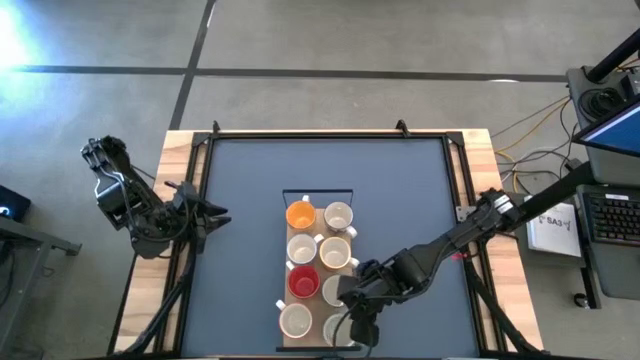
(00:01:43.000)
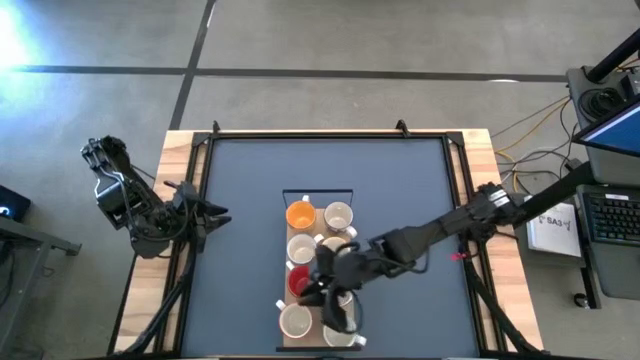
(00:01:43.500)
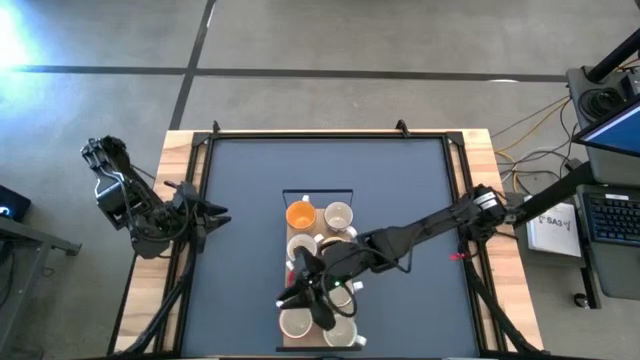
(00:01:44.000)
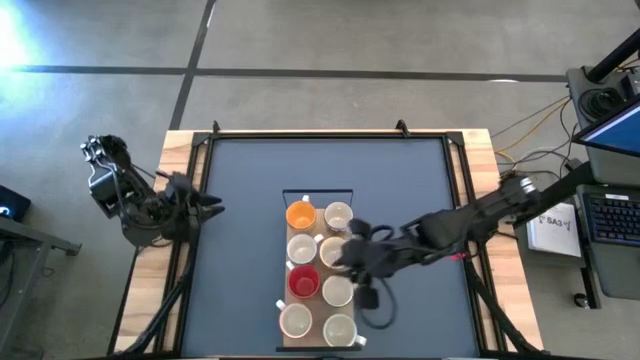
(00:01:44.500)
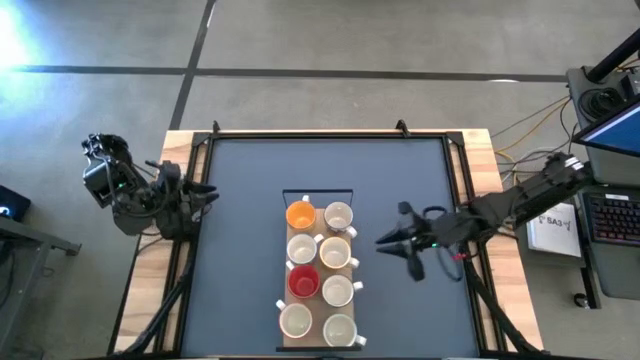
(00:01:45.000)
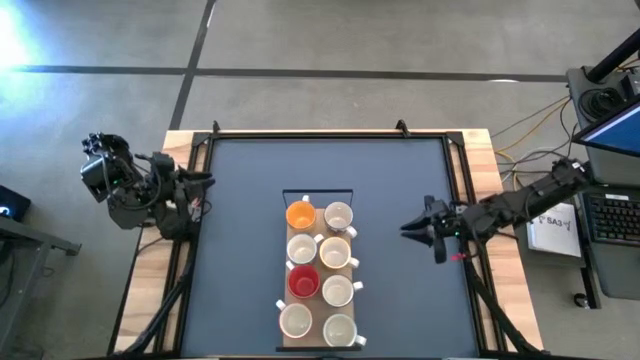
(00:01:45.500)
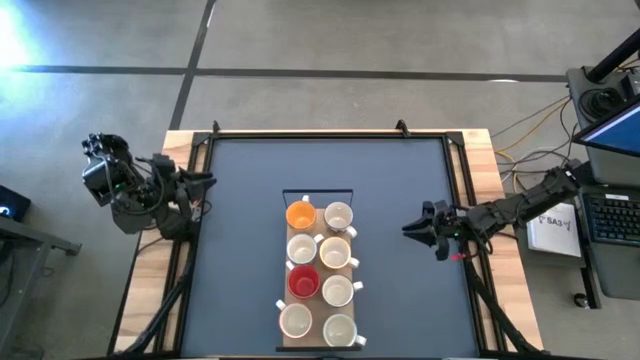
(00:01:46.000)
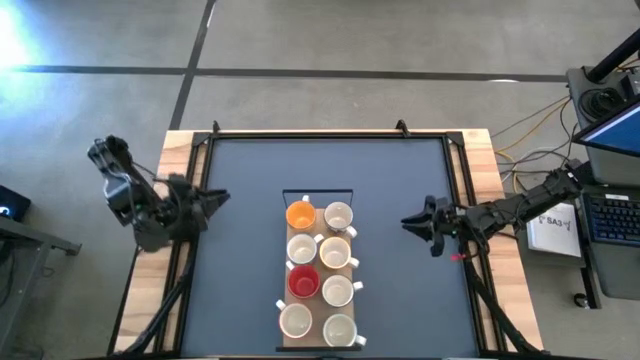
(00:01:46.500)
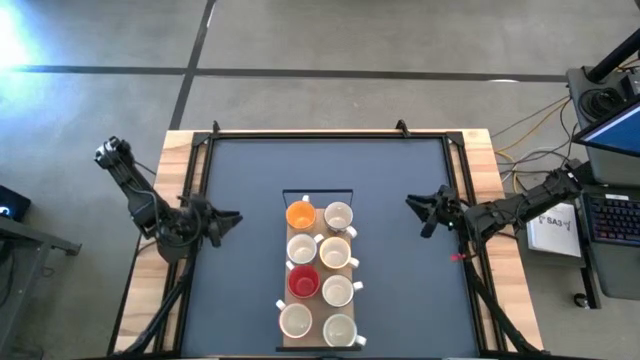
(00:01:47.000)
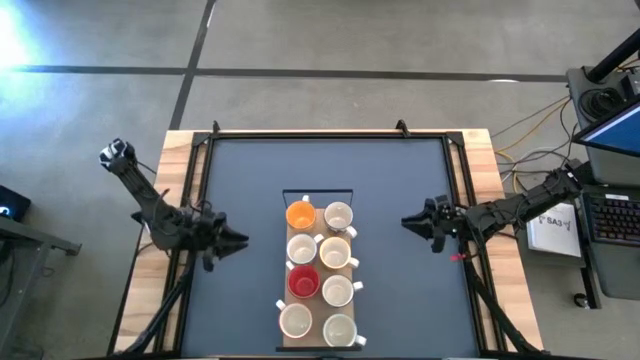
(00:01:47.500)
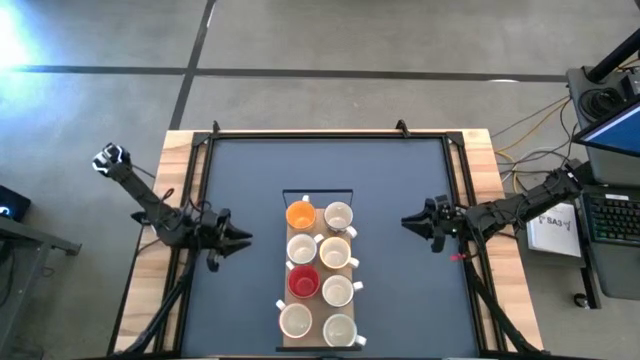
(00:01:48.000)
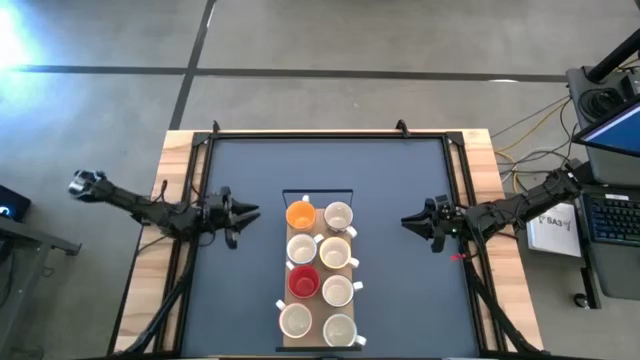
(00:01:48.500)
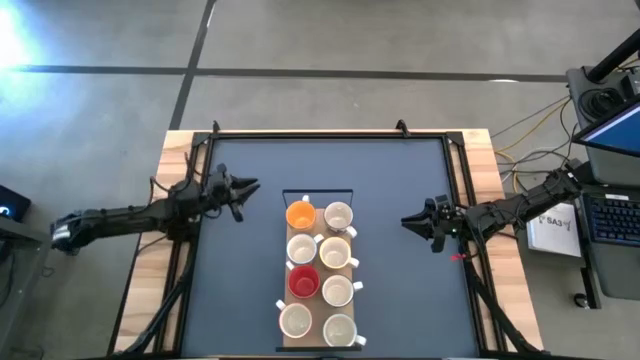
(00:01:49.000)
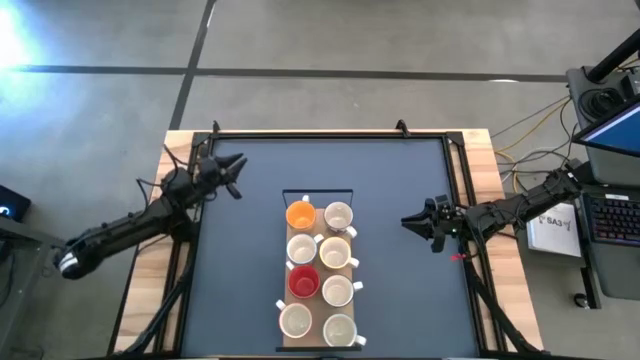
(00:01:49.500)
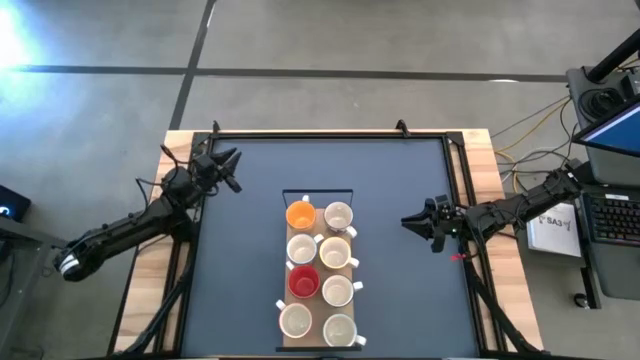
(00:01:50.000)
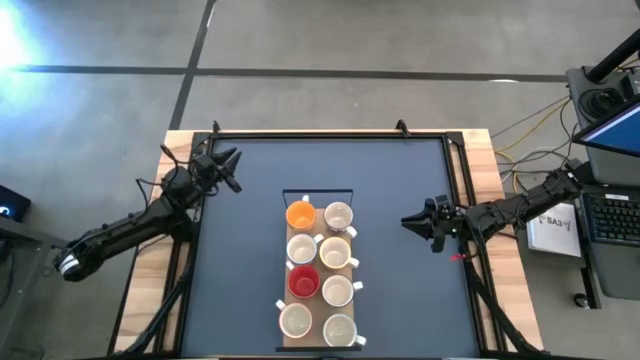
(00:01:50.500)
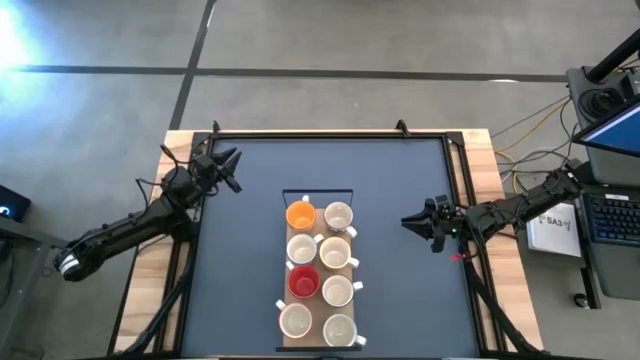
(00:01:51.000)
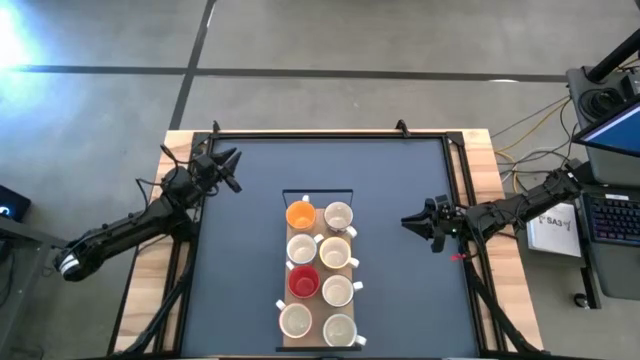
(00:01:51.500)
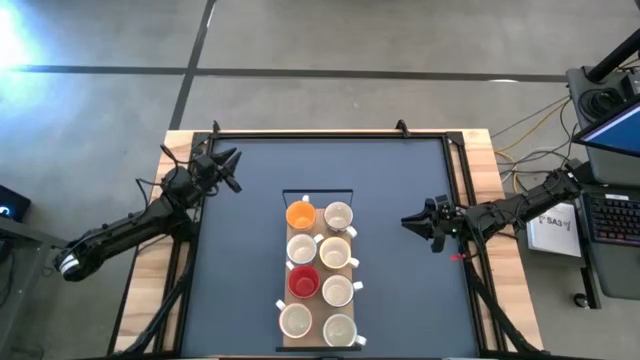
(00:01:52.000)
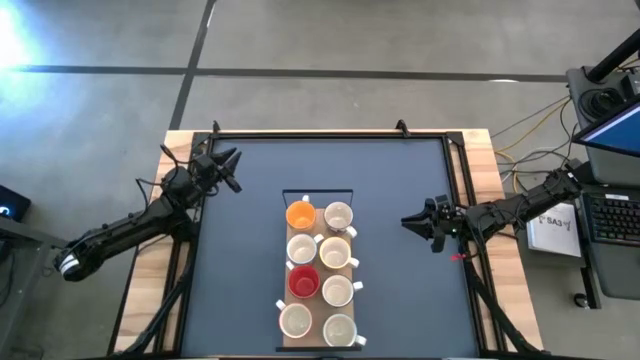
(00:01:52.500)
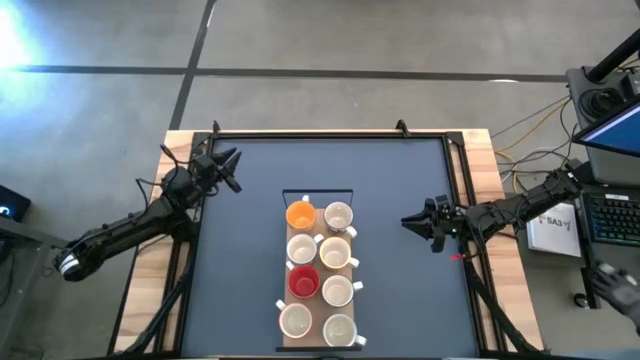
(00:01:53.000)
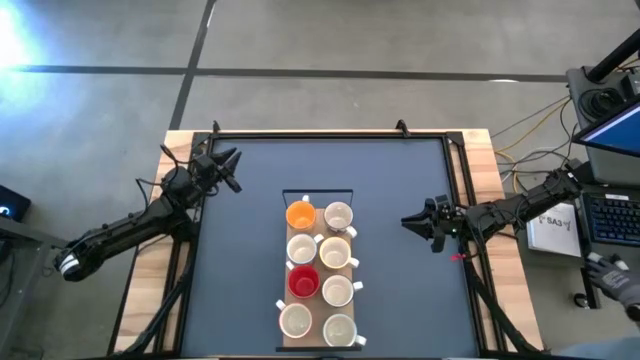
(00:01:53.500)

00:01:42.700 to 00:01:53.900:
Task: Place coffee mugs
Return to Home Position

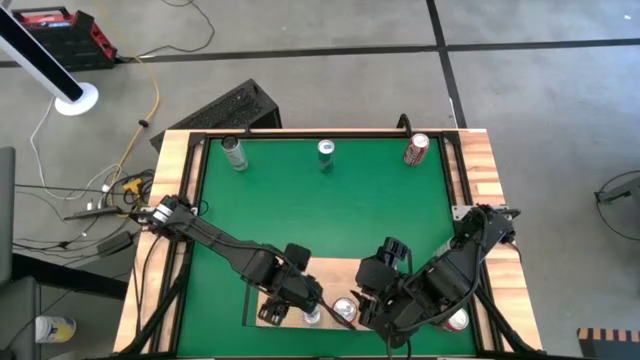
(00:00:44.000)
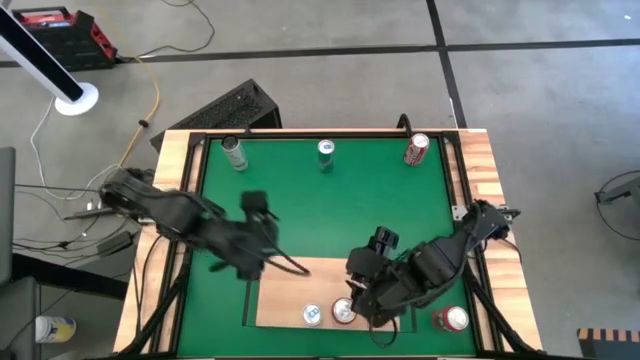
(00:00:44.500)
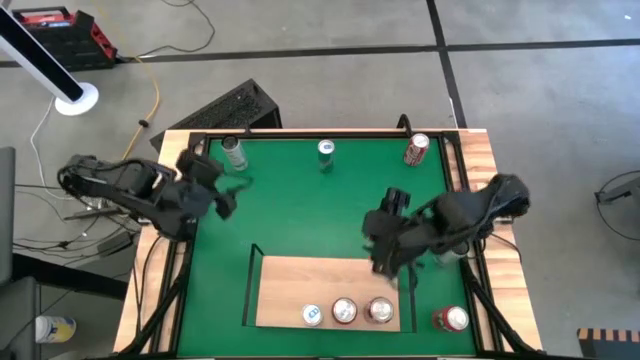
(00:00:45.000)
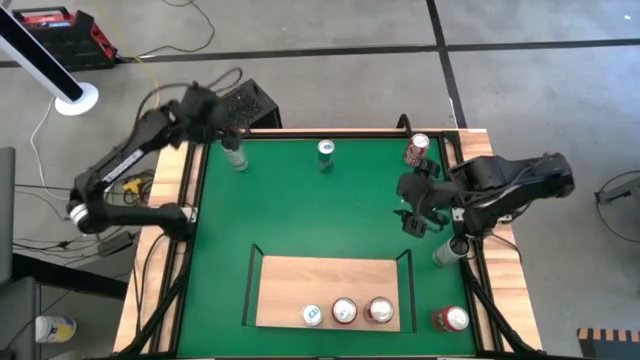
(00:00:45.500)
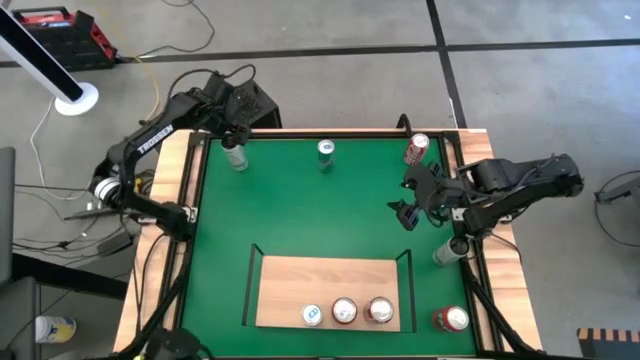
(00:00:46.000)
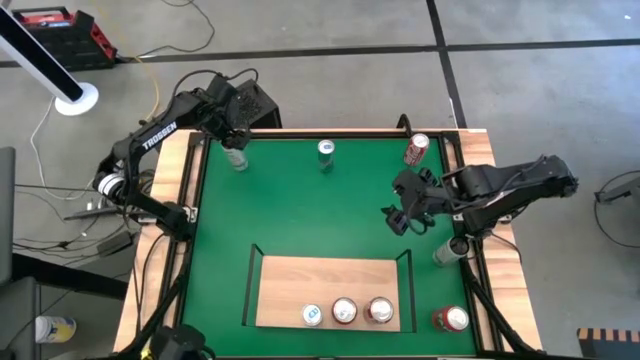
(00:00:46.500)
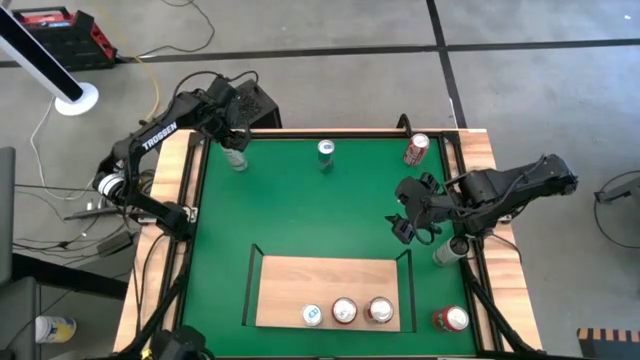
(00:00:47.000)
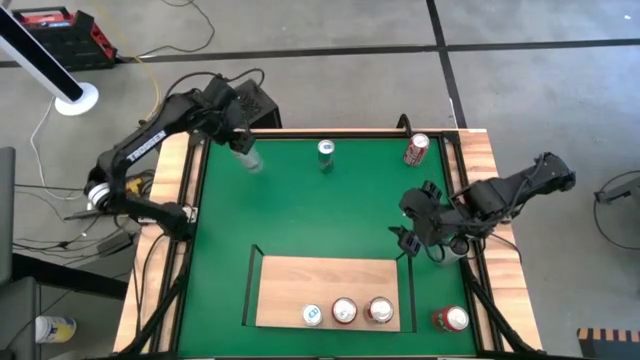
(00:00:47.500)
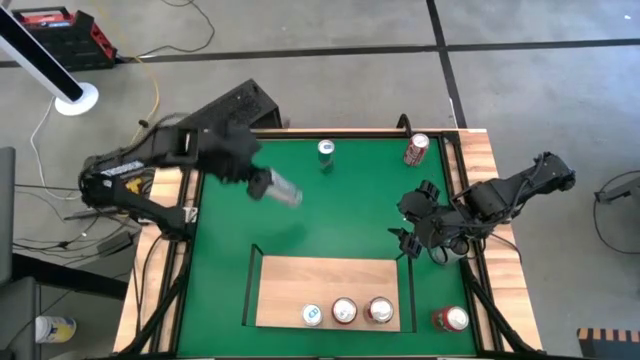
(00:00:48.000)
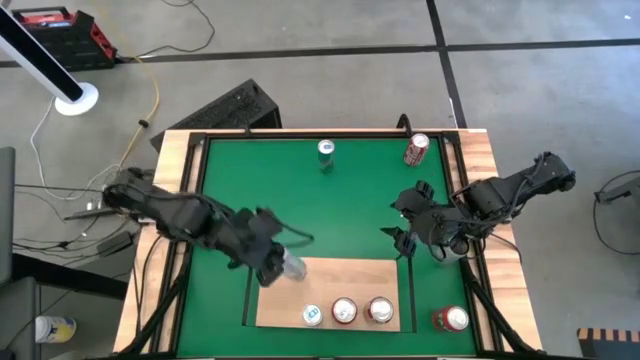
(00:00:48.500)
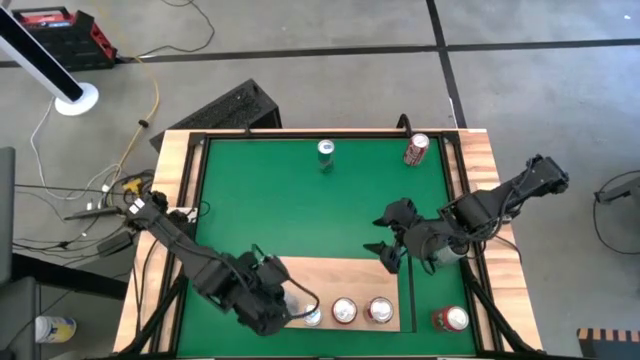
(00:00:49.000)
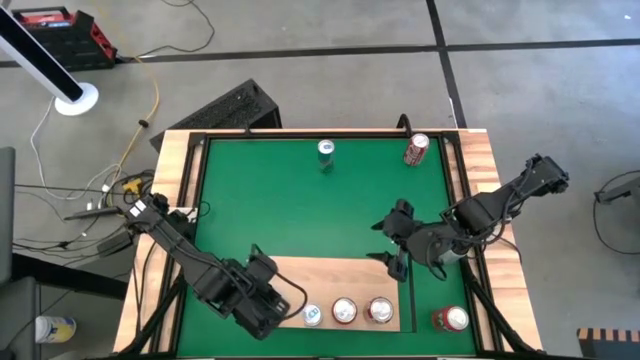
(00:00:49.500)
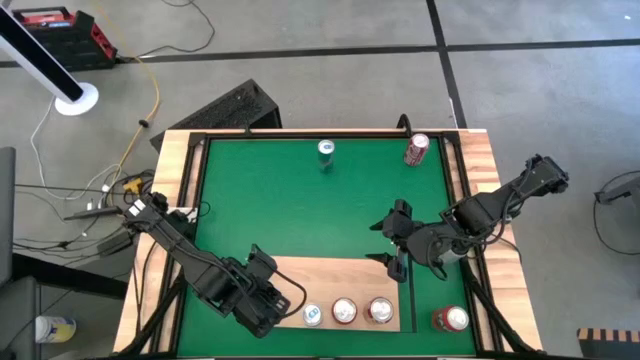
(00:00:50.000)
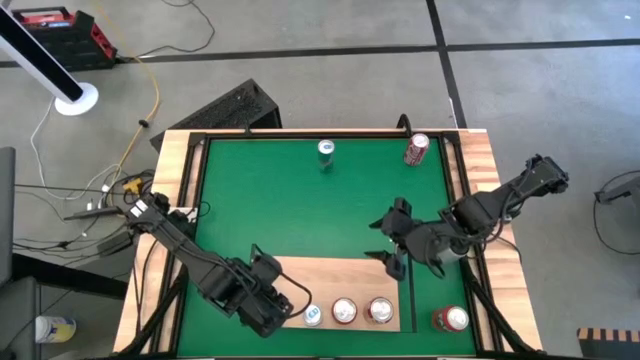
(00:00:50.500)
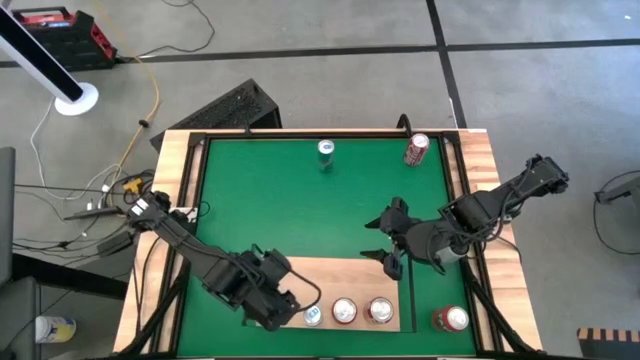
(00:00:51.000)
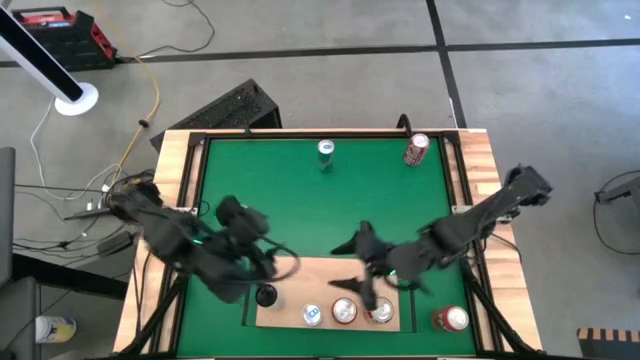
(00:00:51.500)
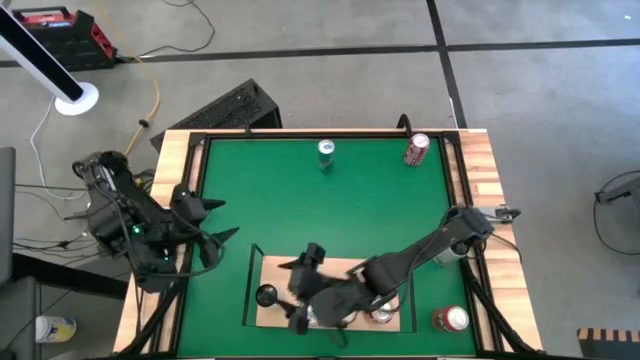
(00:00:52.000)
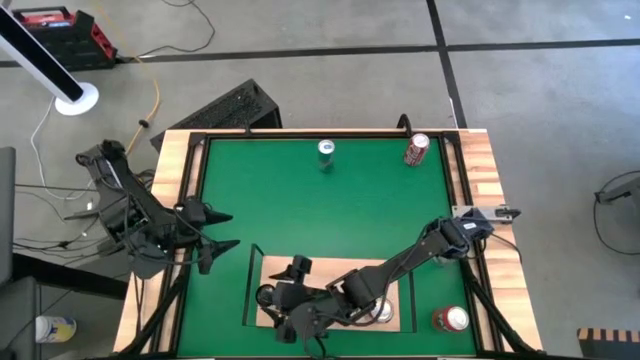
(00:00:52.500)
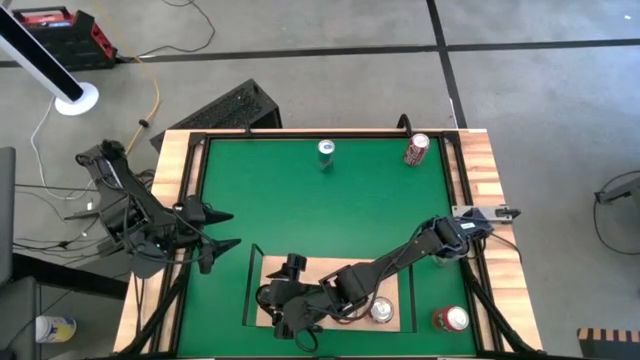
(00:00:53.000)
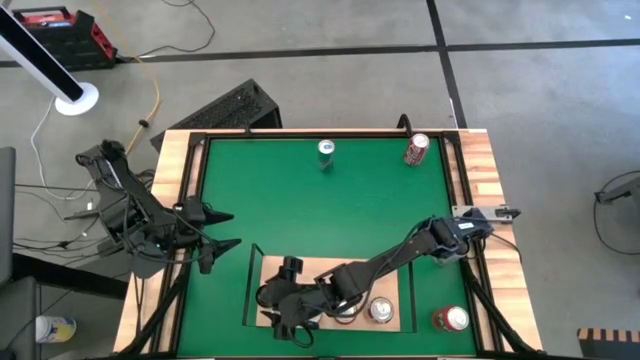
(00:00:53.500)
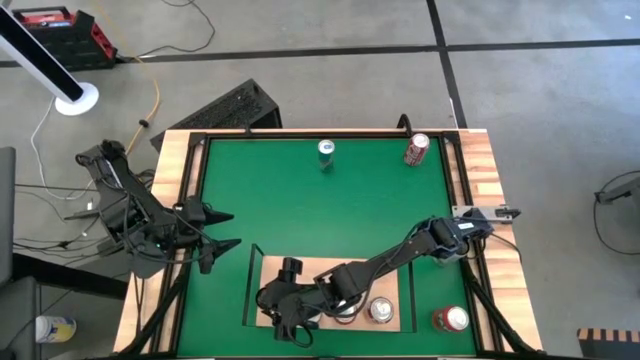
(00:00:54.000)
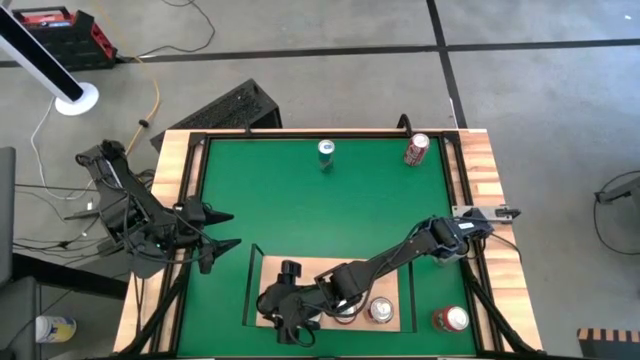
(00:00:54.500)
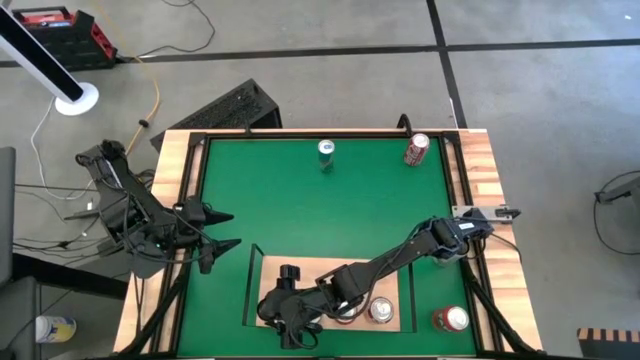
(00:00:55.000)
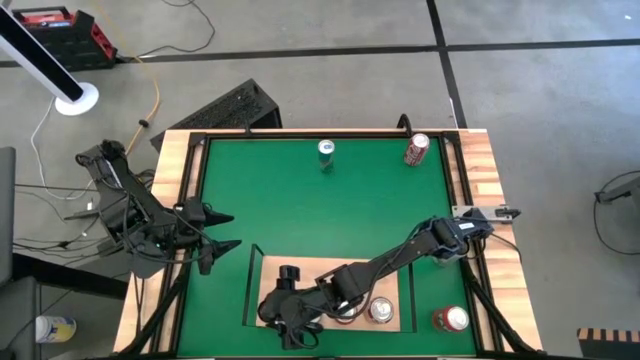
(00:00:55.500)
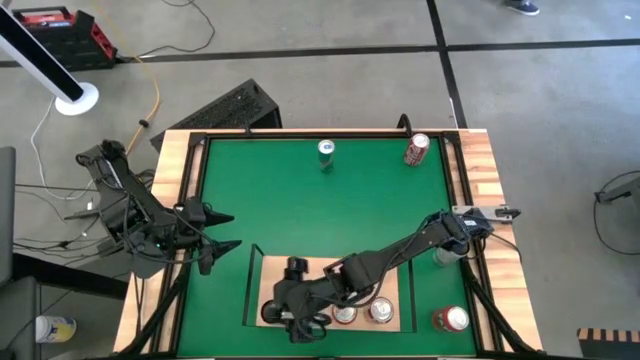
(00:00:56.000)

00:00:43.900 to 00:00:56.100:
Task: Place canned beverage on shelf
Put the top white soda can on the shelf
